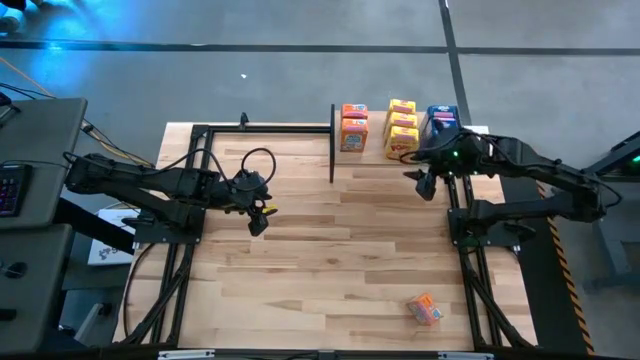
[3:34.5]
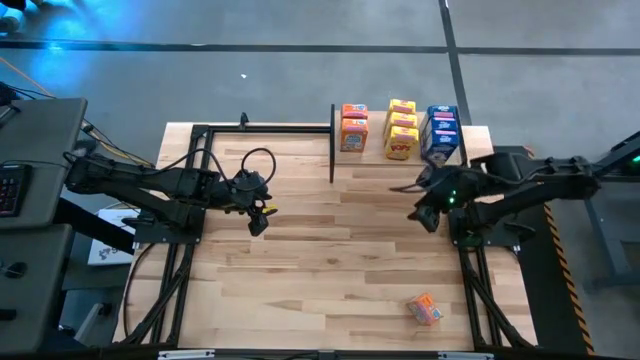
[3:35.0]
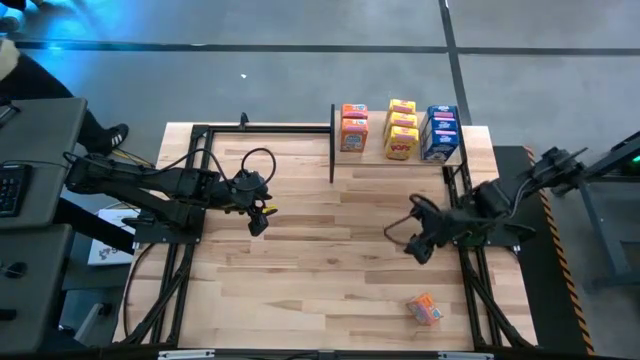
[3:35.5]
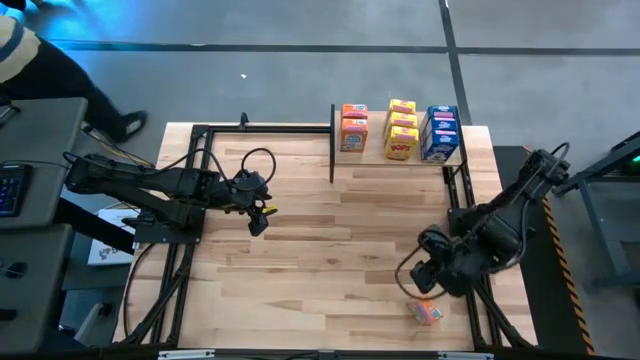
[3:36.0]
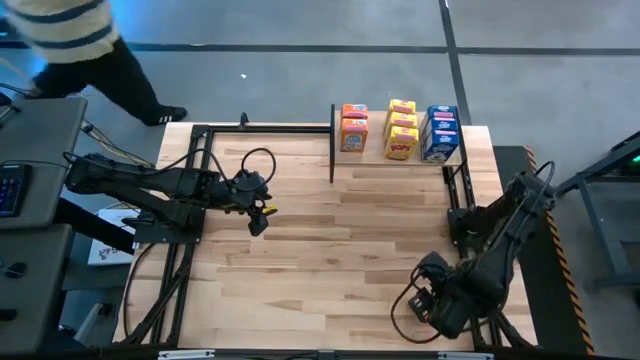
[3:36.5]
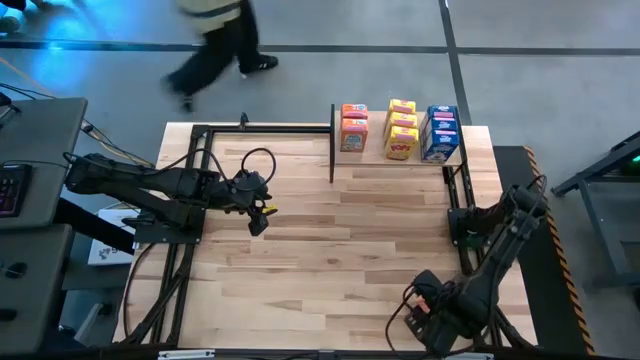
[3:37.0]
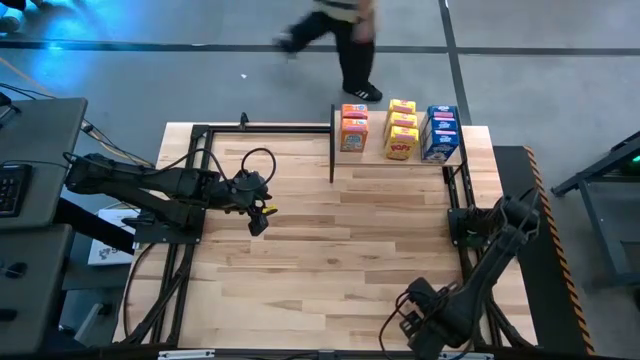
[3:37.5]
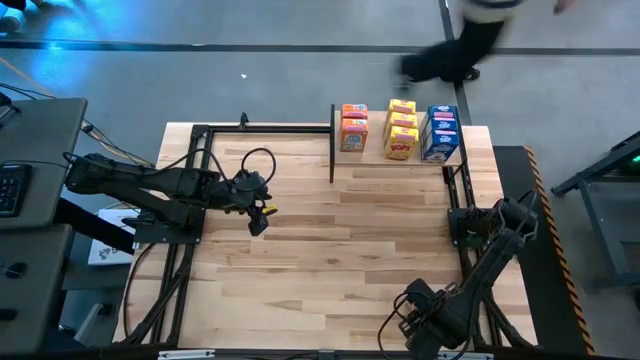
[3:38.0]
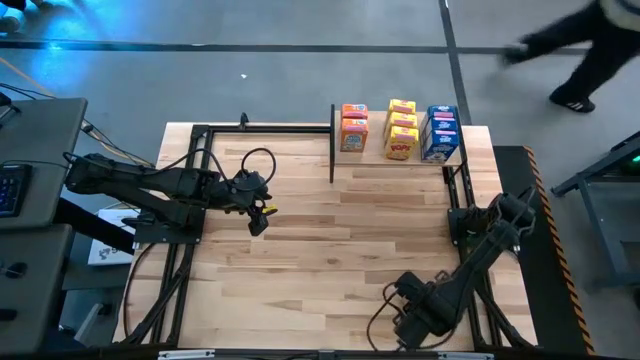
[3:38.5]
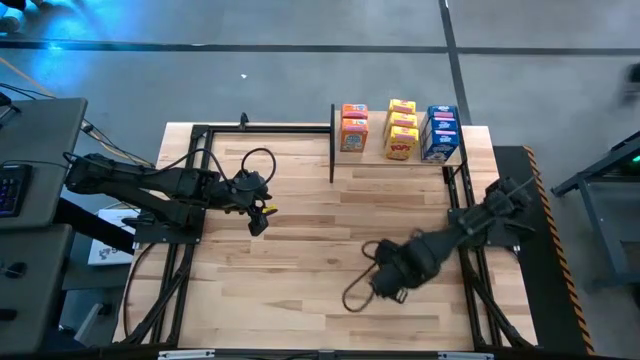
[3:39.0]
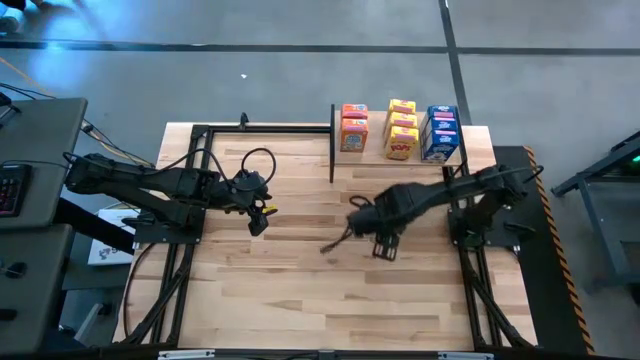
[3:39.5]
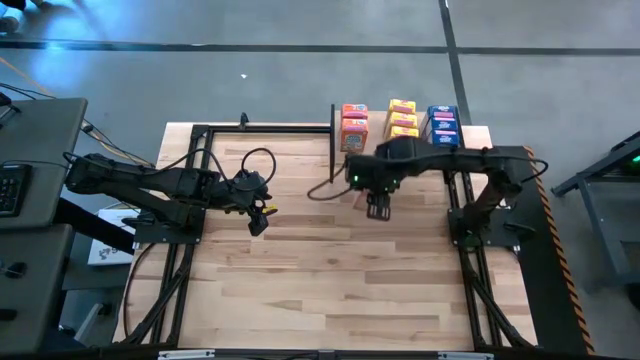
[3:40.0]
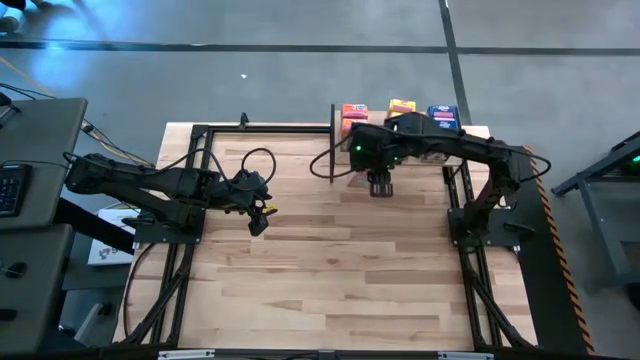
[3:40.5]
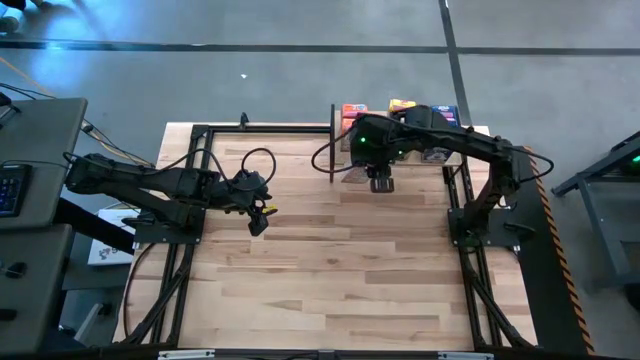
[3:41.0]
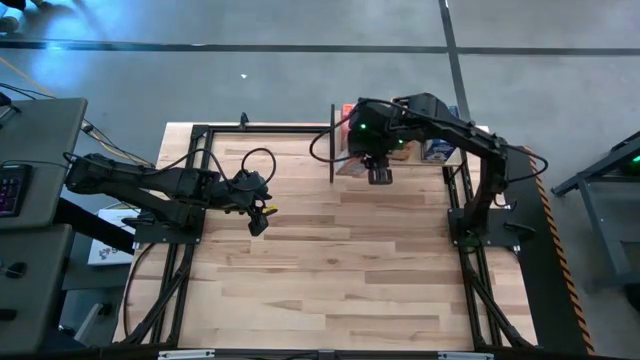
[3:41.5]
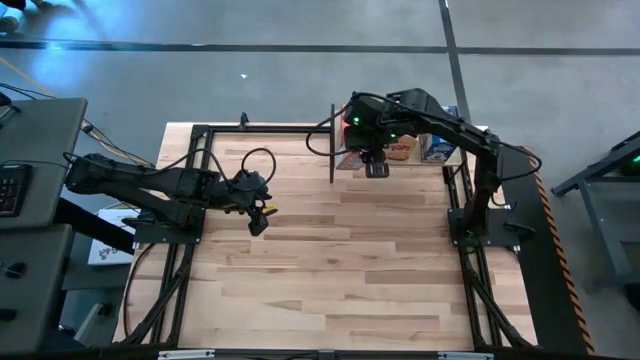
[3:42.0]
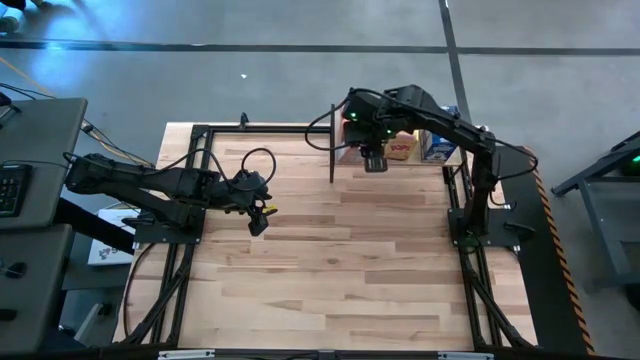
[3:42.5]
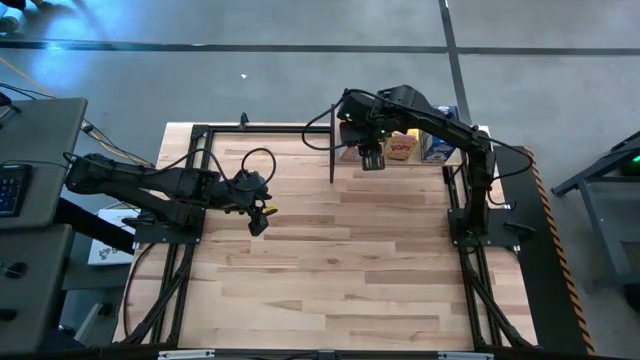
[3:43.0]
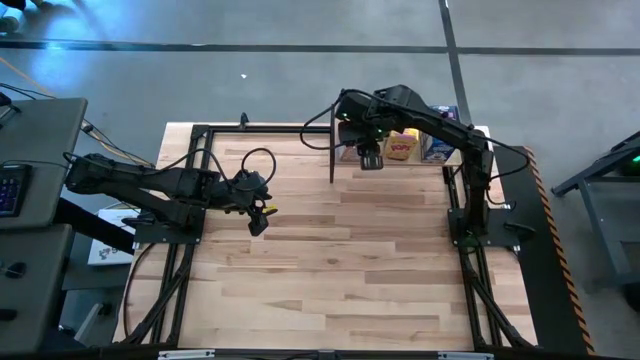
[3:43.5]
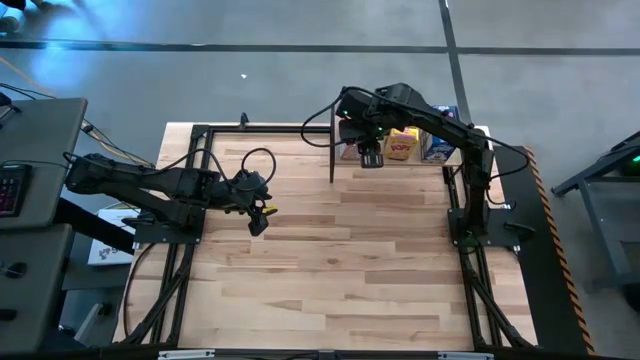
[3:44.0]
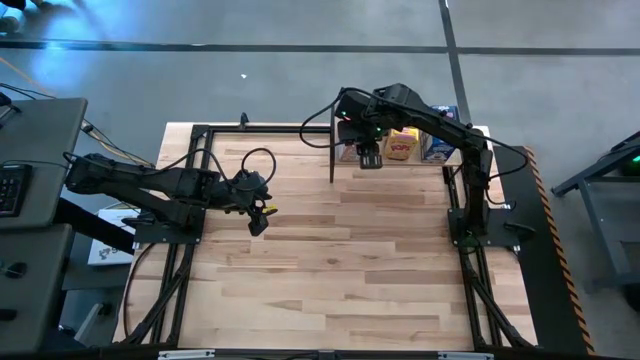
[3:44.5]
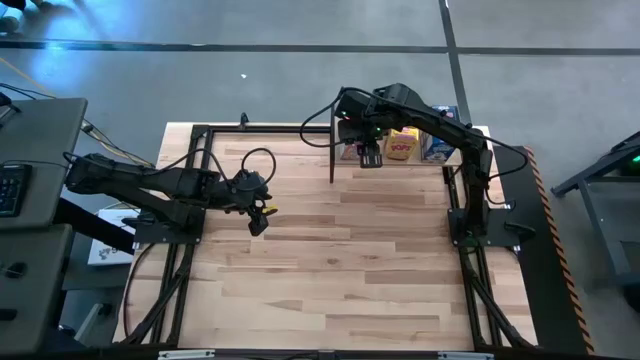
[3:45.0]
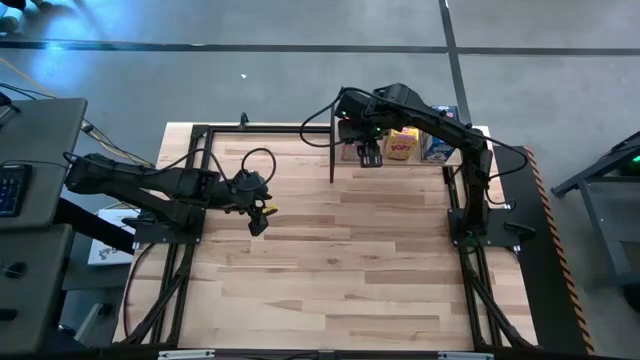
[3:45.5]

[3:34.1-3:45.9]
Task: Stack cereal on shelf
Put the orange cereal box on the shelf aligned with the other orange cereal boxes

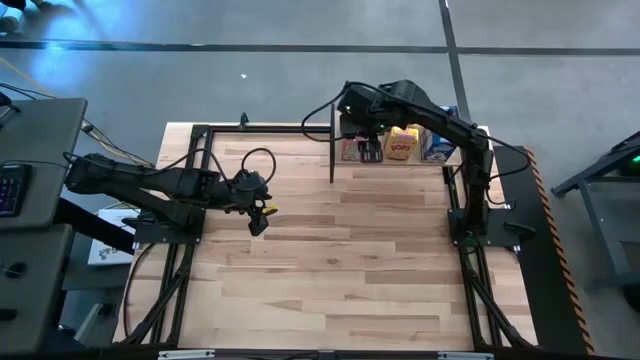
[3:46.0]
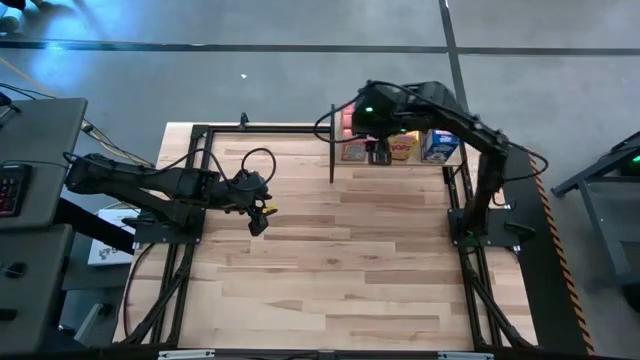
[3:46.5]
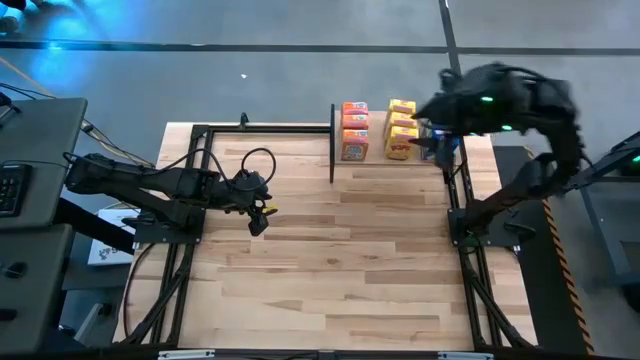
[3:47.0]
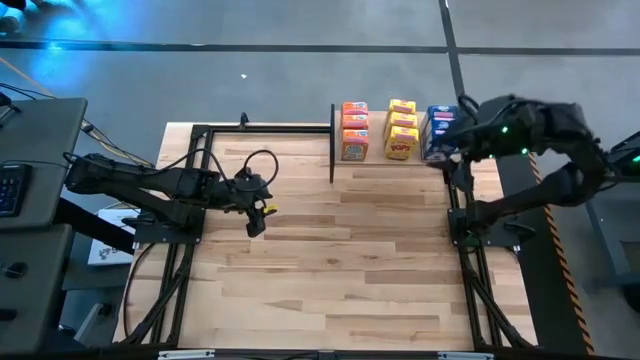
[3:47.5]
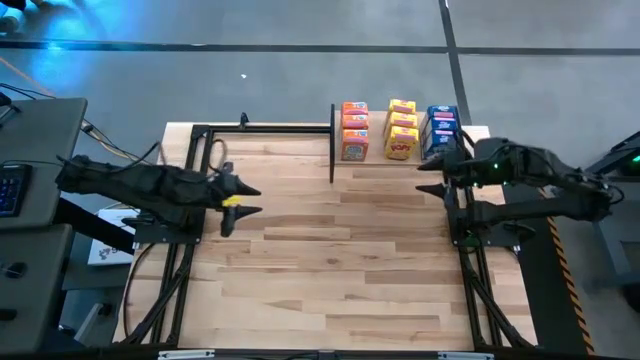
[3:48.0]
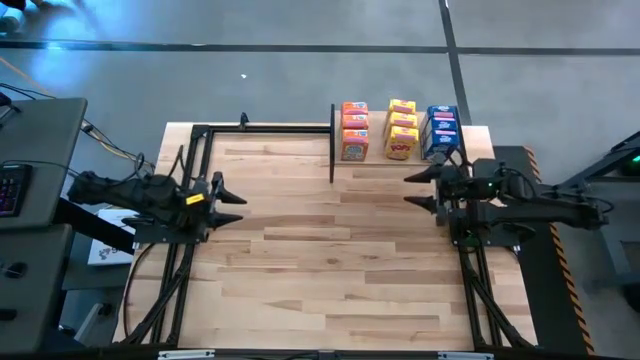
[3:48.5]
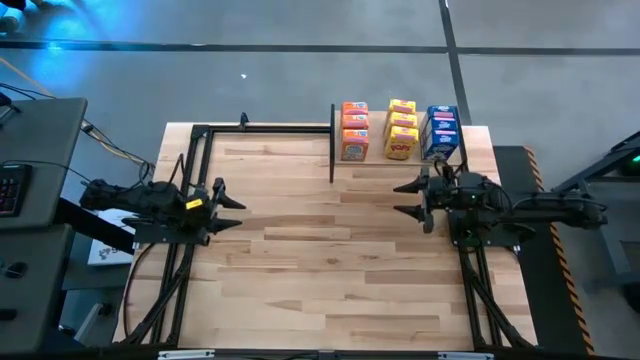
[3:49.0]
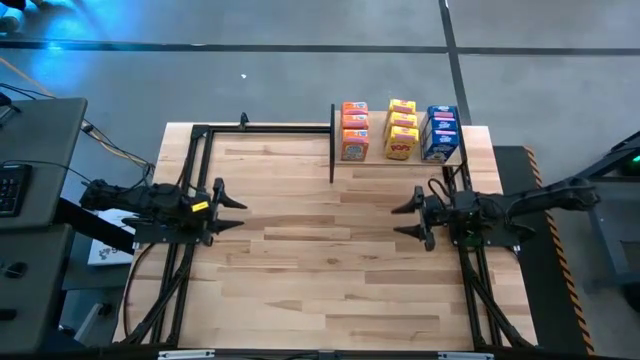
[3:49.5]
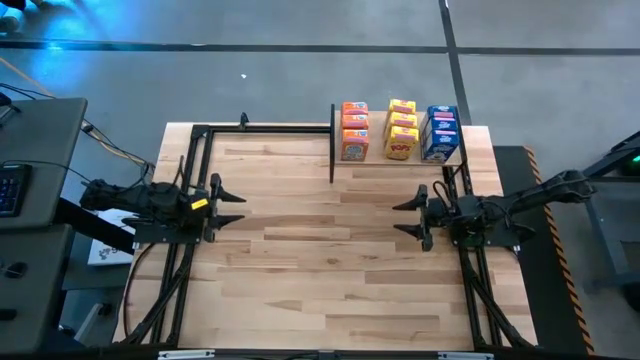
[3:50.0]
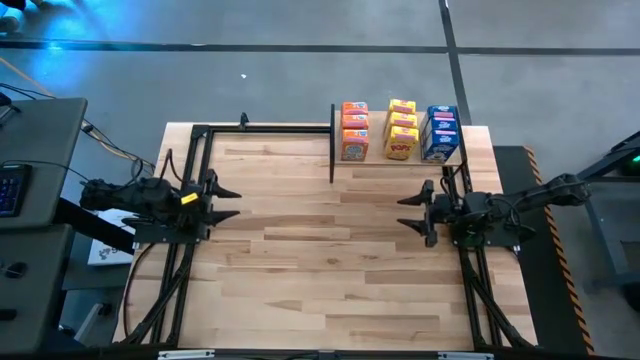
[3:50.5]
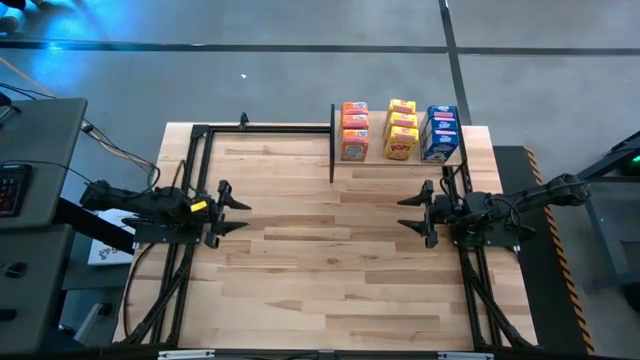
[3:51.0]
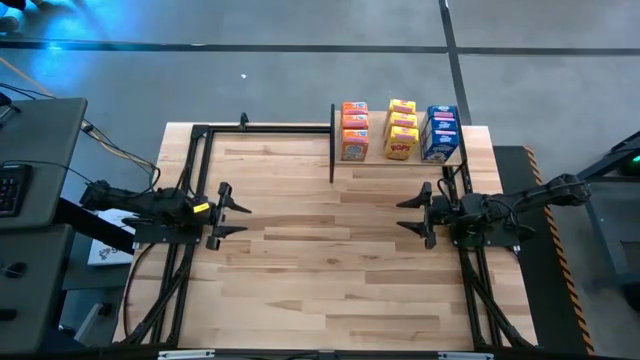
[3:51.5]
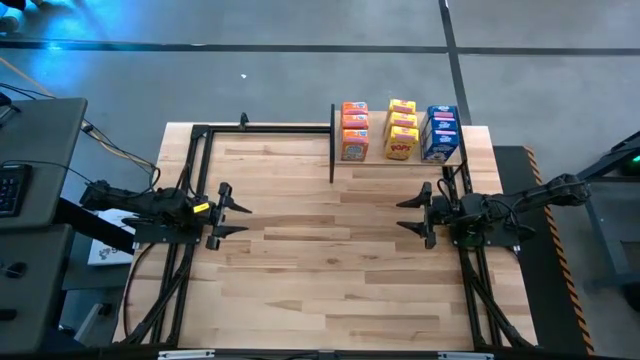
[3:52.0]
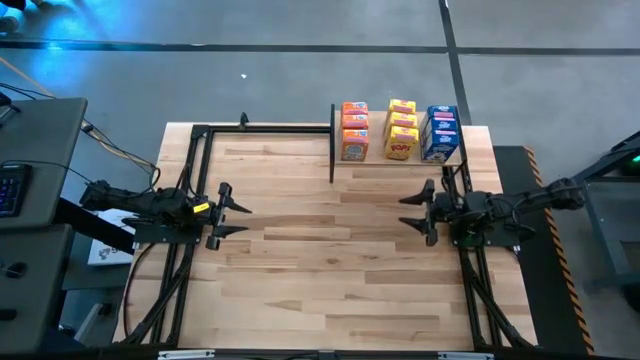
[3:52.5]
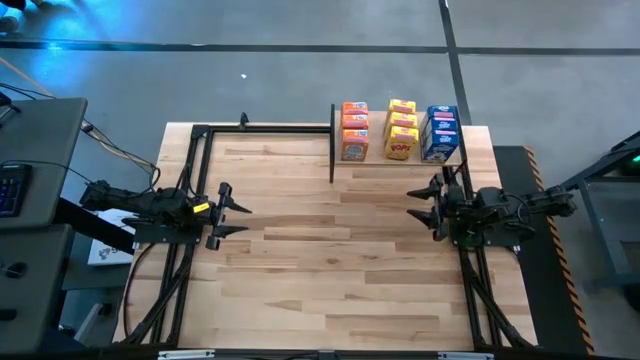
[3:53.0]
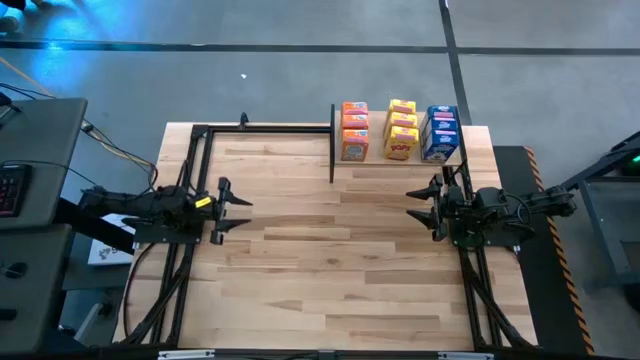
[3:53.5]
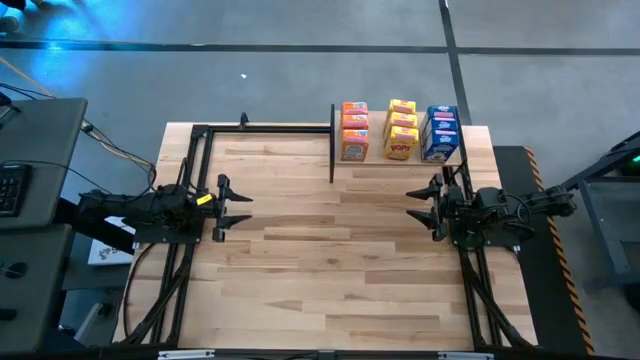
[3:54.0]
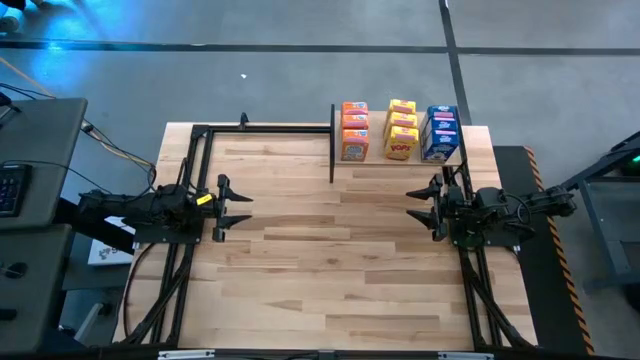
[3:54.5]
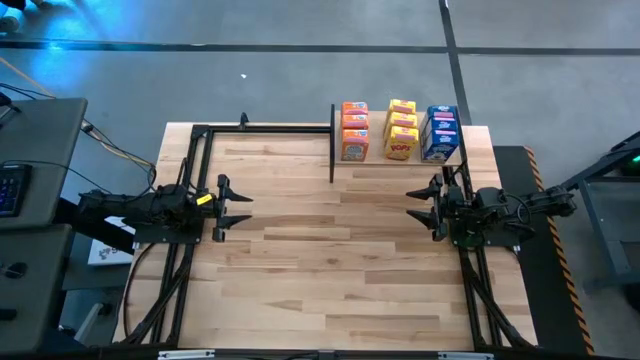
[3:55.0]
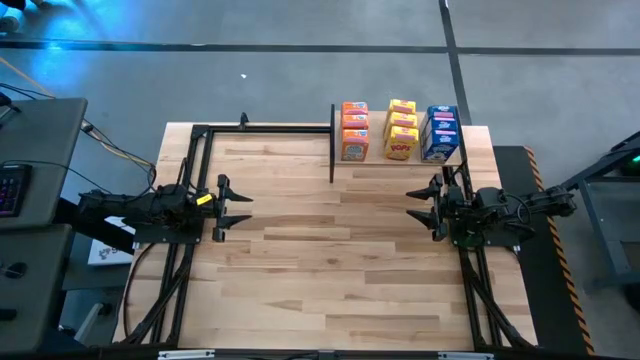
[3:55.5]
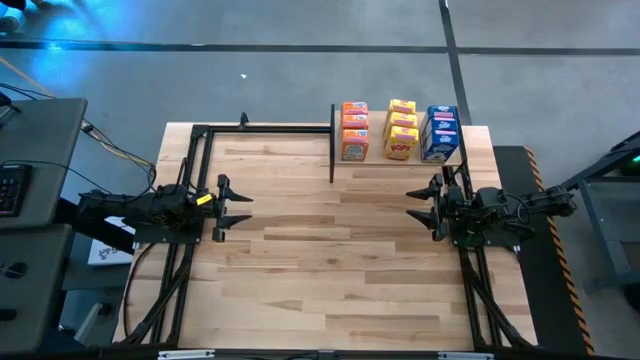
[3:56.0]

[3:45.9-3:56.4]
Return to Home Position
